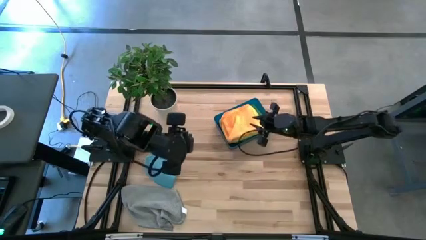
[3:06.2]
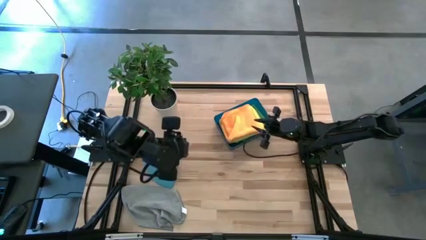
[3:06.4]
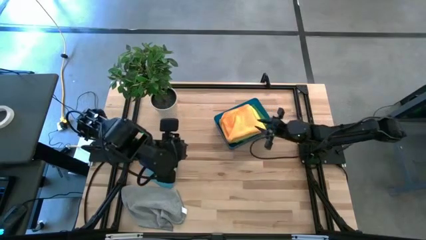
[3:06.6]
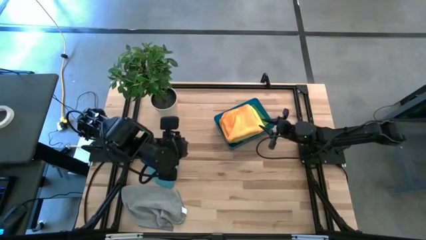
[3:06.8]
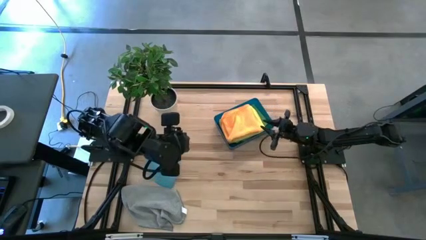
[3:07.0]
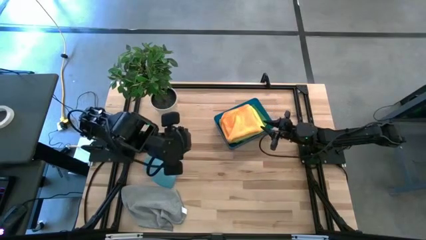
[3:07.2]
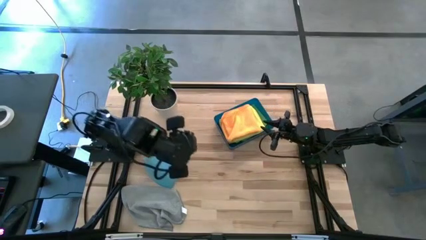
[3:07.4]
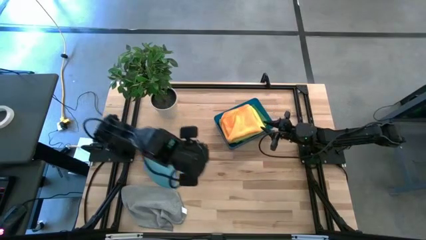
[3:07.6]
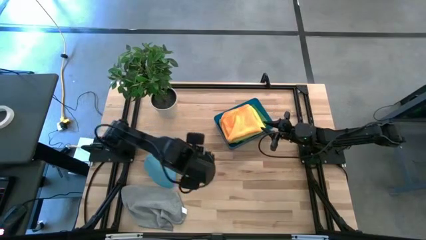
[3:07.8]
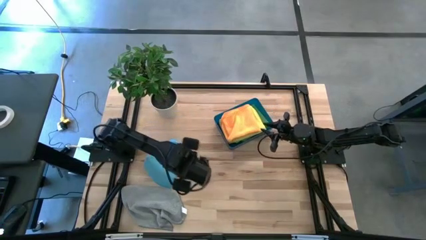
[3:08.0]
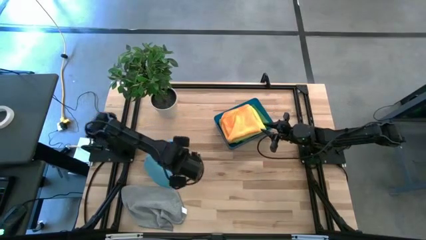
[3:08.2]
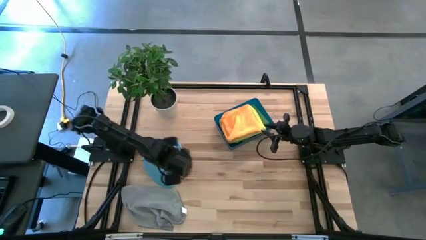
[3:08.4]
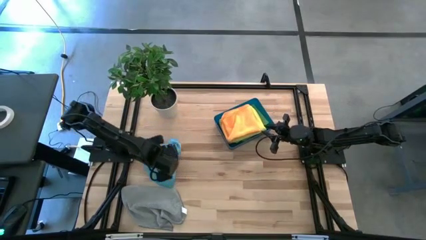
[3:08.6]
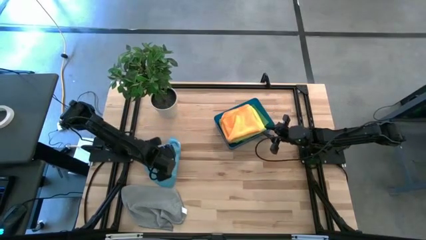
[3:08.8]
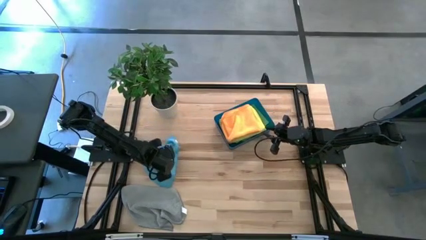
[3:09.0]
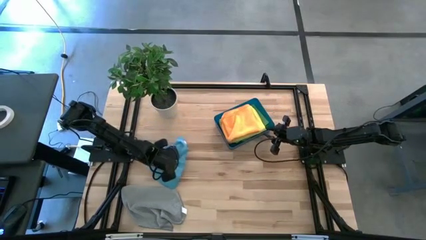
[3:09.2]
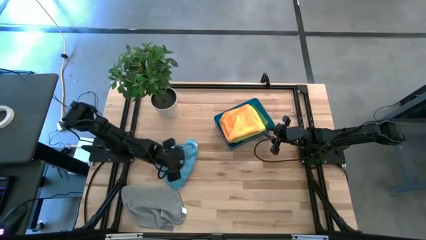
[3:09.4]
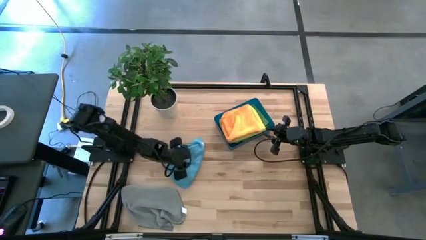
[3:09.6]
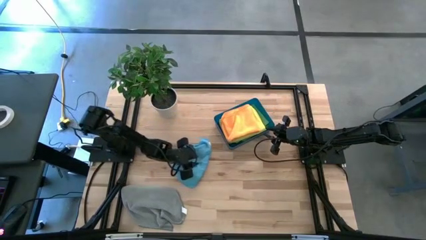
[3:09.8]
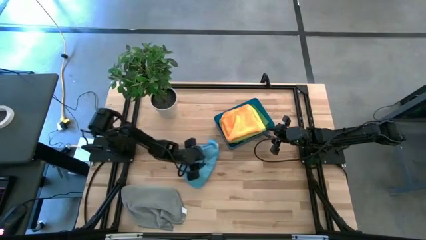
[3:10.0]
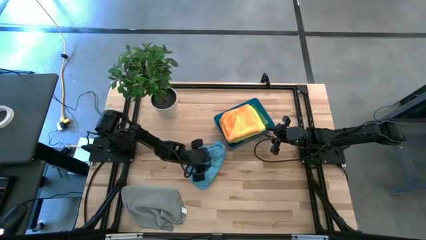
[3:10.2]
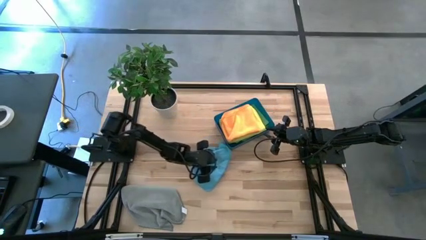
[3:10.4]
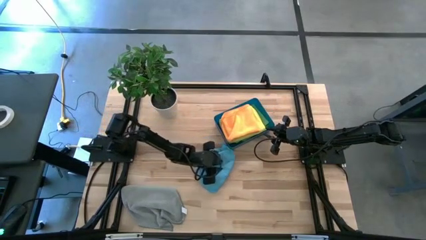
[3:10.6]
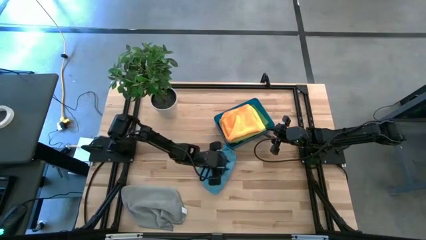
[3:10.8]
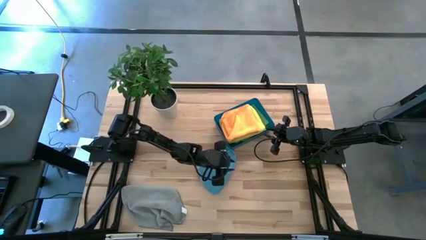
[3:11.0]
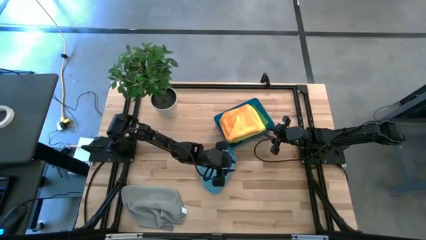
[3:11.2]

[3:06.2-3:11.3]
Task: Fold microfiber towels
Move the blue microfiber cloth to the center of the table

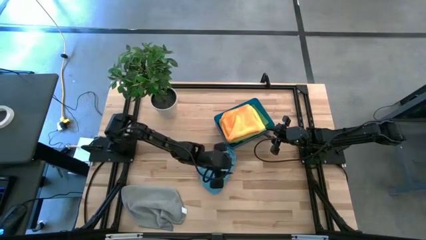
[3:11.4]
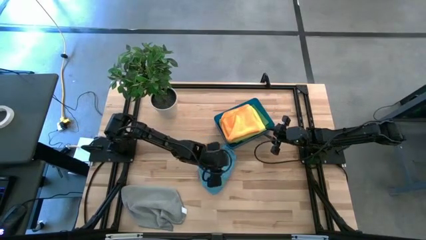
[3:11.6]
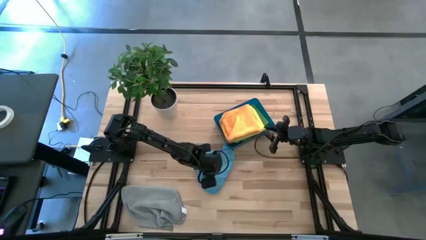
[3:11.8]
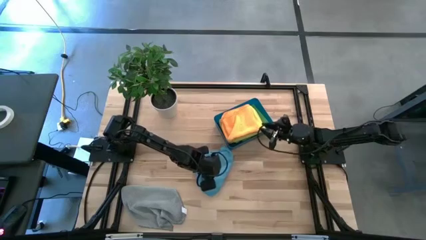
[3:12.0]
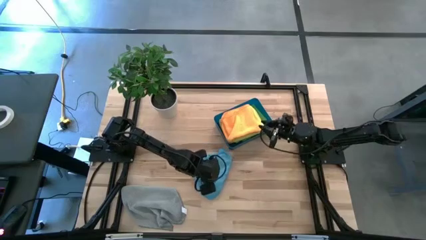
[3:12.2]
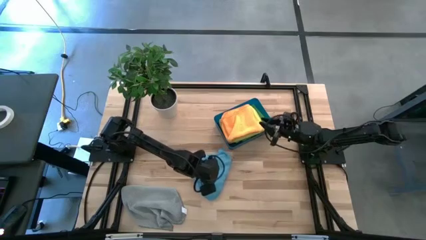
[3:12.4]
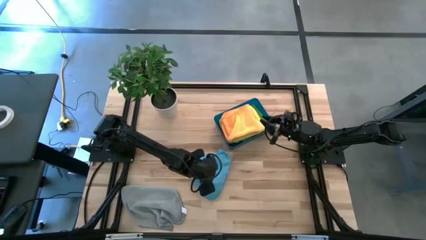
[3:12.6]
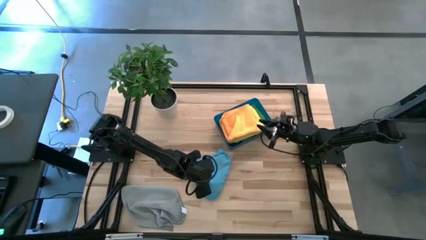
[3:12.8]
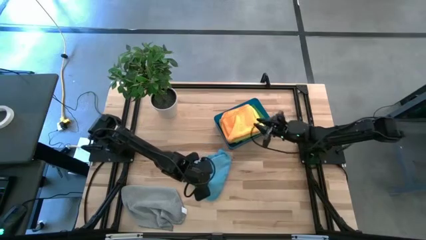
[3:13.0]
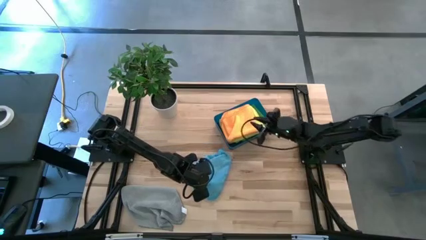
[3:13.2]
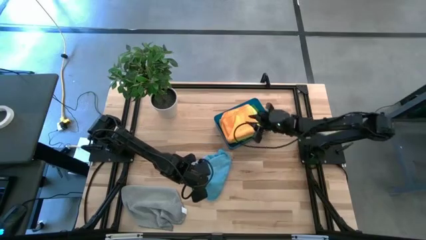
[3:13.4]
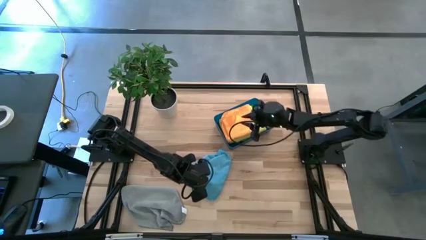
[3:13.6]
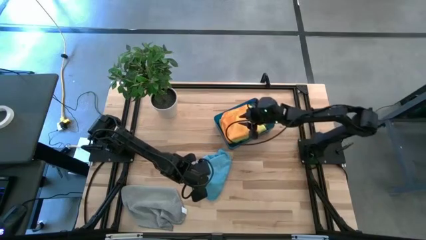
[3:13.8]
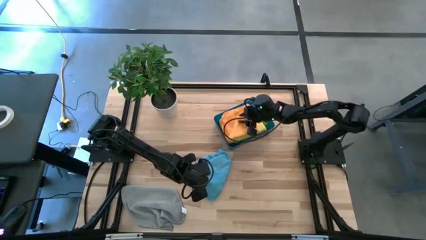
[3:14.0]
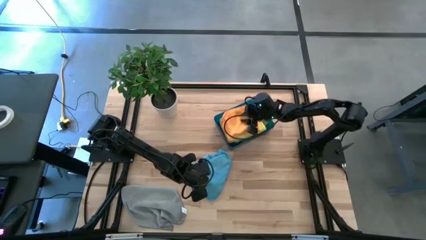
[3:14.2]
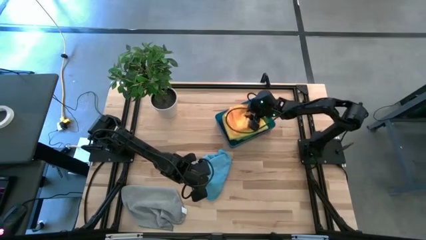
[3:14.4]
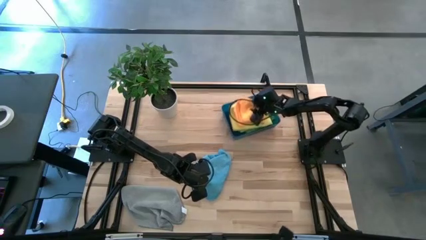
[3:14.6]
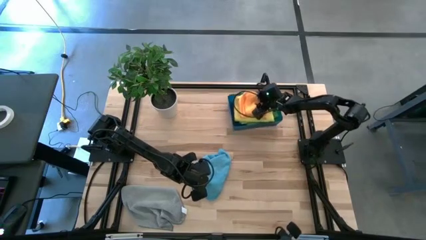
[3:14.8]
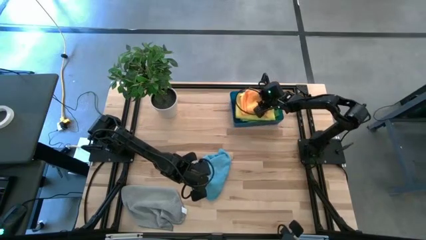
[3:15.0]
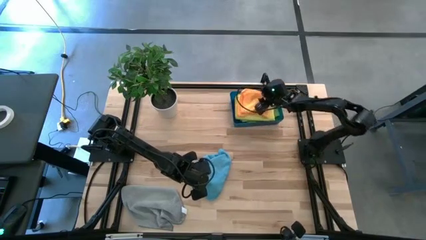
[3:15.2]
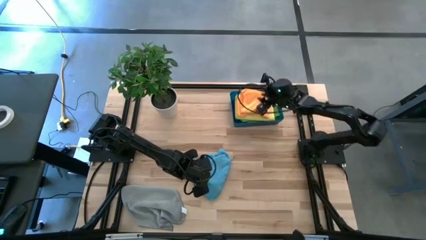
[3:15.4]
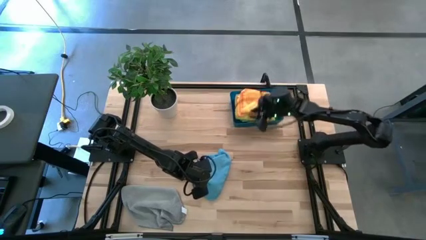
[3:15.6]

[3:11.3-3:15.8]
Move the blue bin to the top right of the table

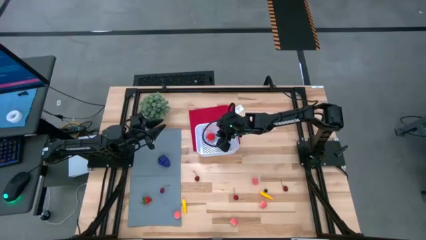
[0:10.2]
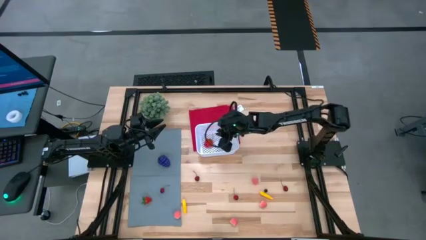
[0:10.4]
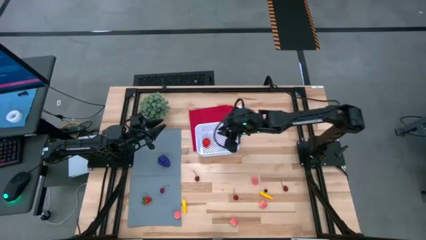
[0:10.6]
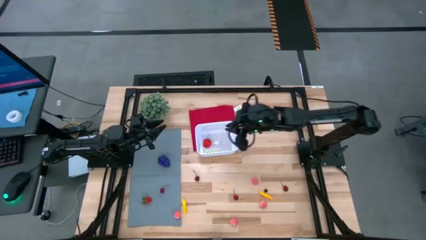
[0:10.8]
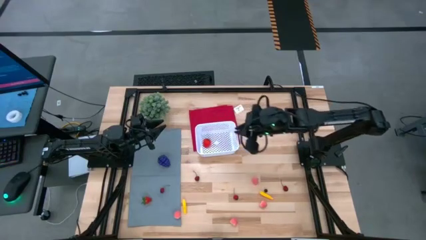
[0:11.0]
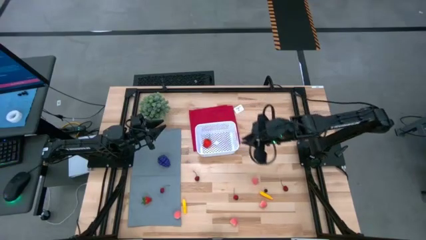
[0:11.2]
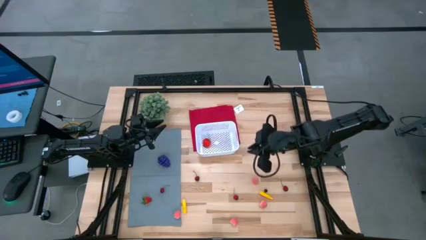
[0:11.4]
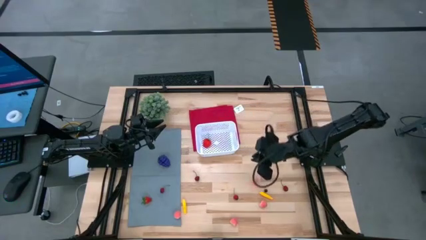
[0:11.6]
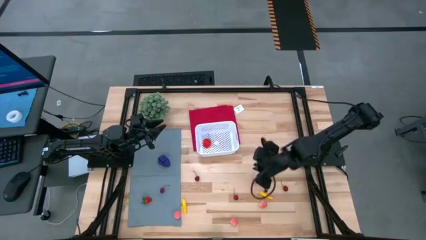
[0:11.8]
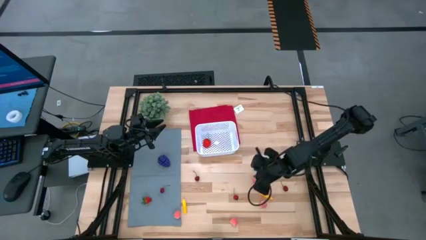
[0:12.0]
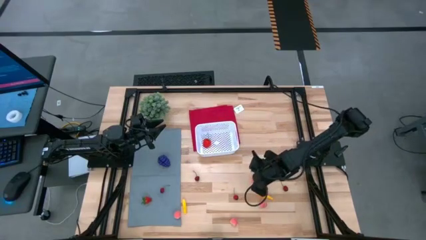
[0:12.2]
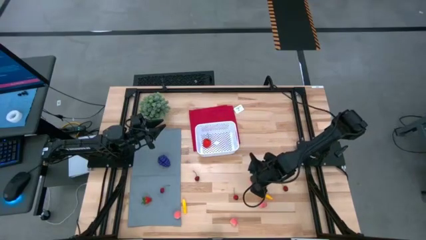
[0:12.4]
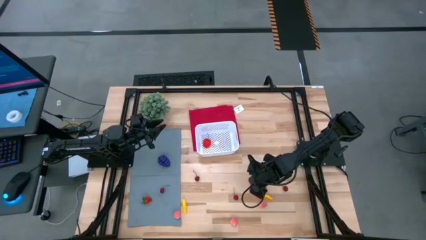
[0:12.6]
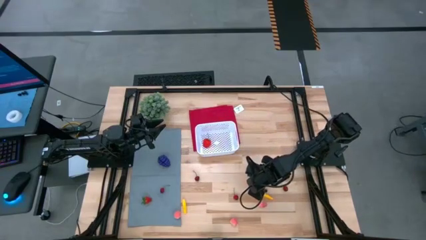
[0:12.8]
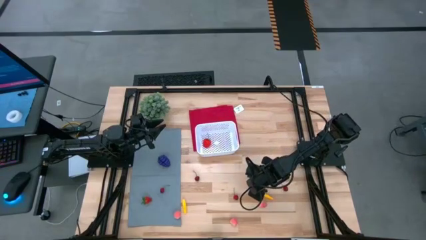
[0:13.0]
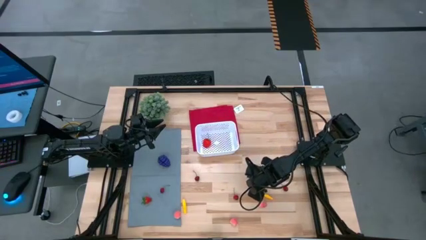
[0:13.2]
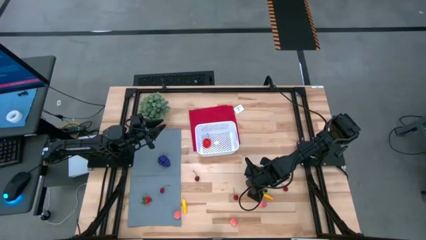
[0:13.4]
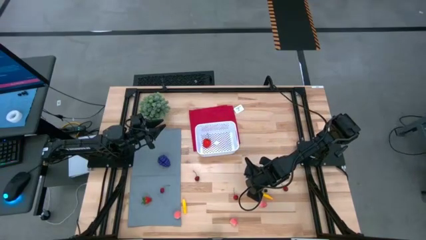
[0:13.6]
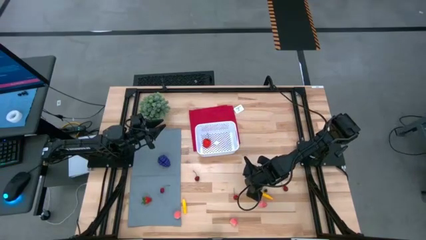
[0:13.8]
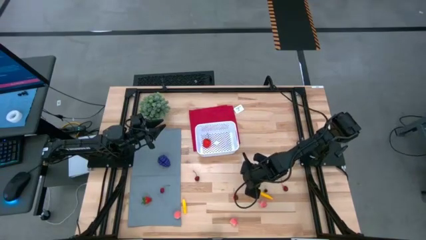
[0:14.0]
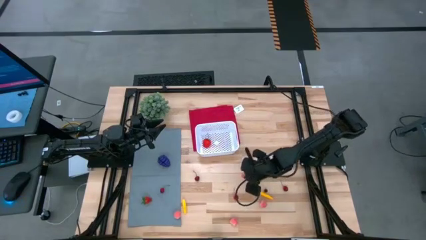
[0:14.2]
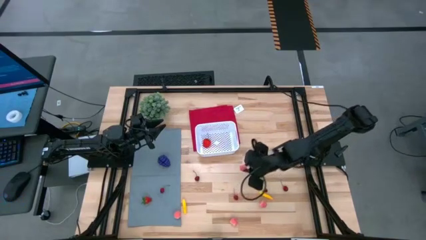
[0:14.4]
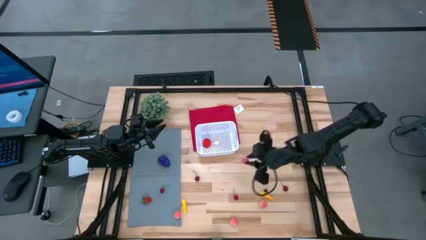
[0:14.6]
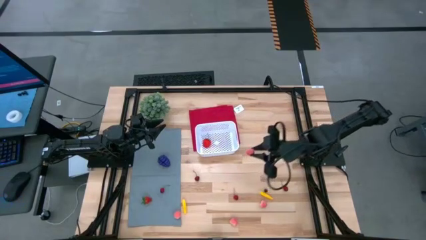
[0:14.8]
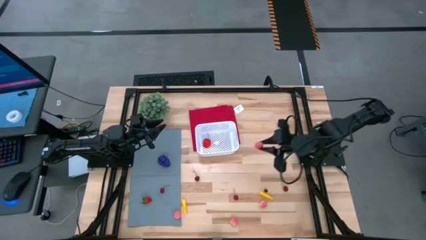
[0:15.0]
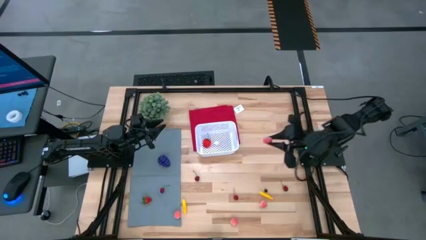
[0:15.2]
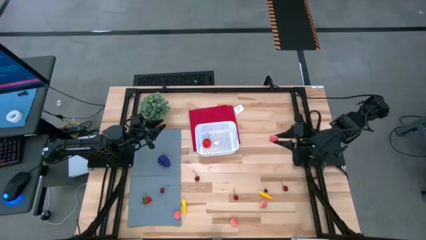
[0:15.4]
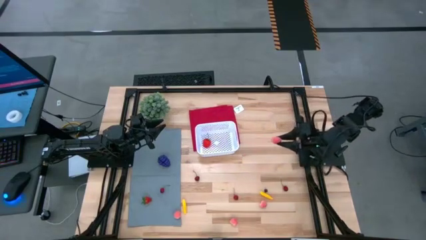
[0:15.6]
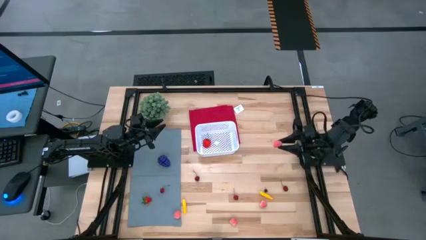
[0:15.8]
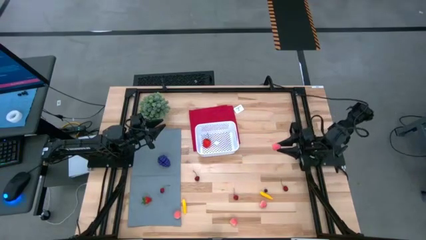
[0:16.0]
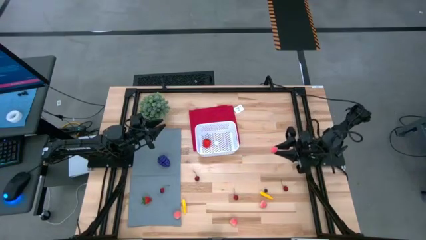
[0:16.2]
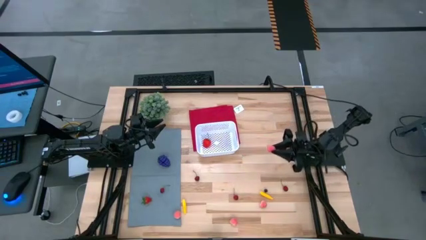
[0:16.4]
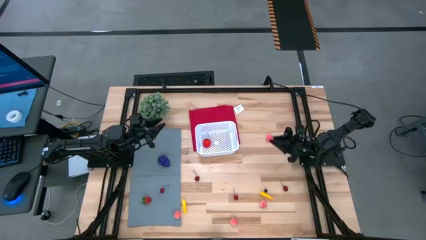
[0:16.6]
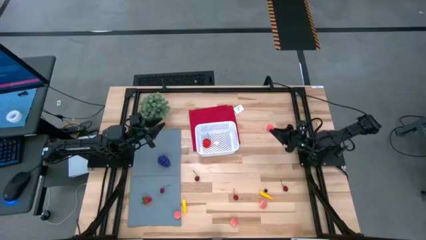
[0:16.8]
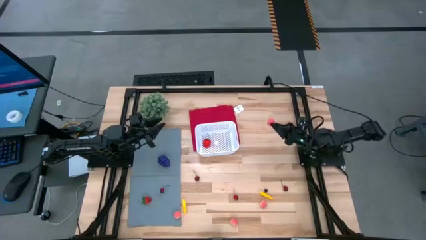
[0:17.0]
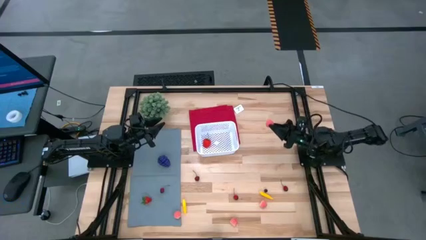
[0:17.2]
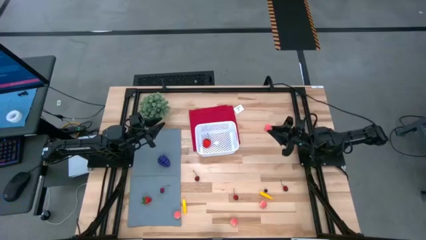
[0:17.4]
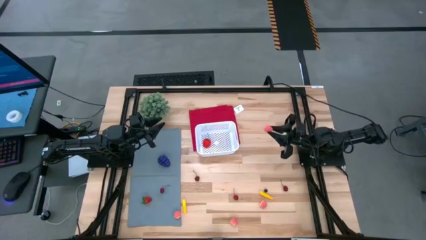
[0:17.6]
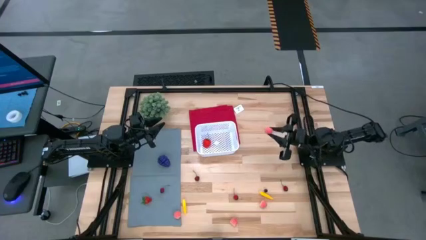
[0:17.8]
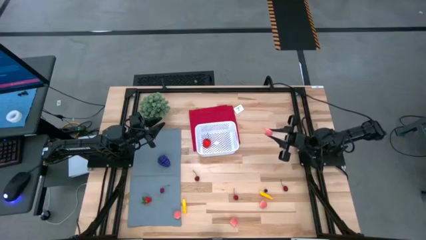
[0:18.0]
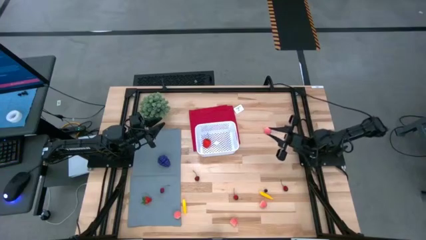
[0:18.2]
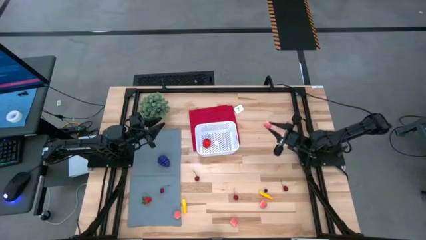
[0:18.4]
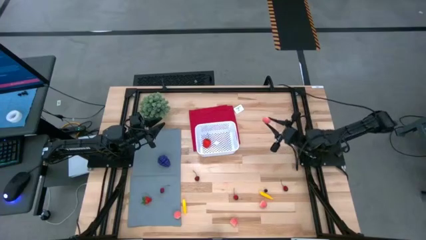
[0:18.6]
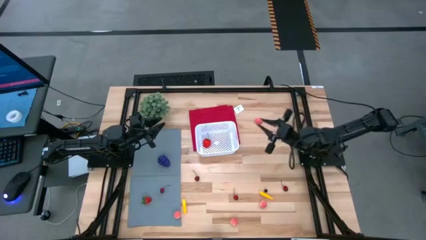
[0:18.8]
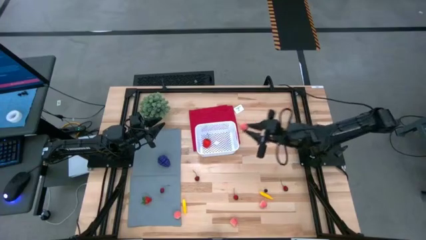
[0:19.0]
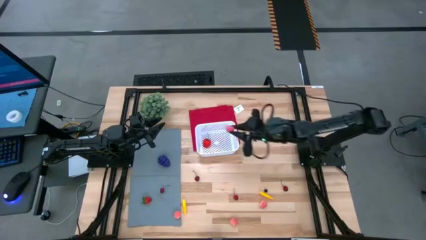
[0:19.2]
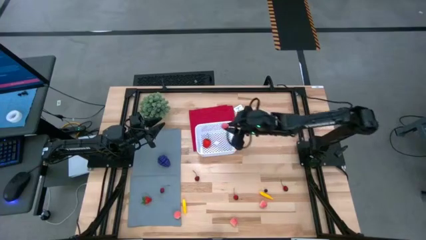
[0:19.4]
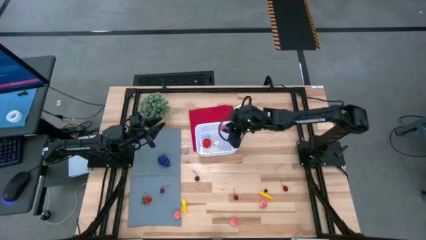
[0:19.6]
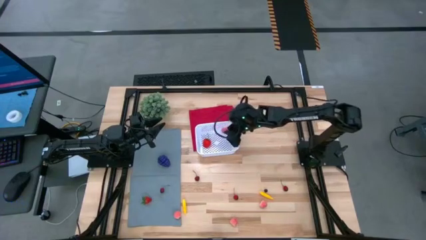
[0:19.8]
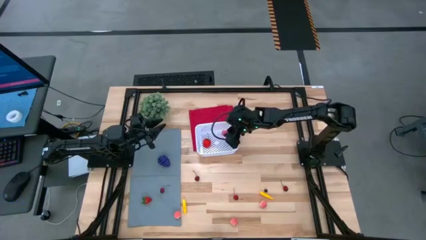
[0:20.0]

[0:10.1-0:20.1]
Task: Pick and placing Produce into tupperware
Put the pink peach into the white bin
